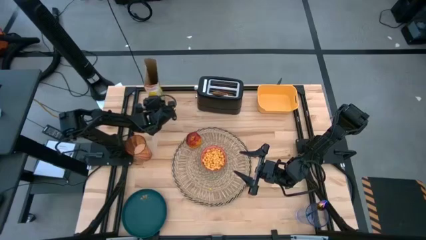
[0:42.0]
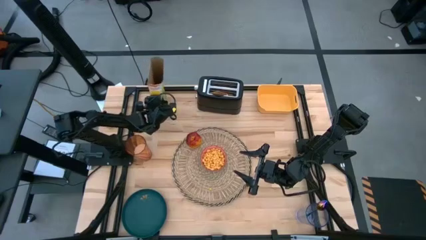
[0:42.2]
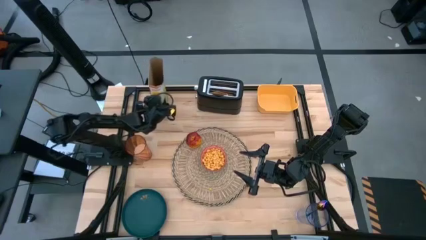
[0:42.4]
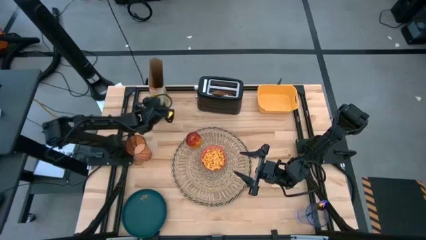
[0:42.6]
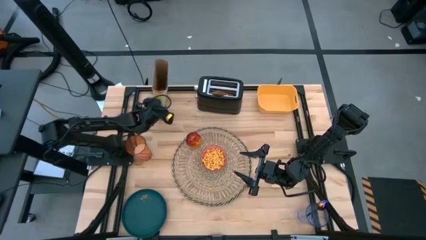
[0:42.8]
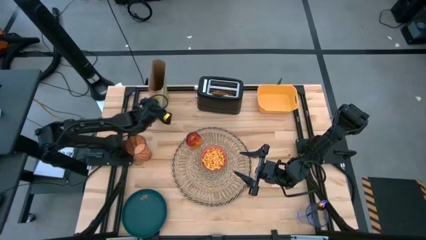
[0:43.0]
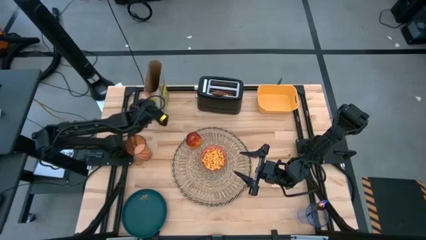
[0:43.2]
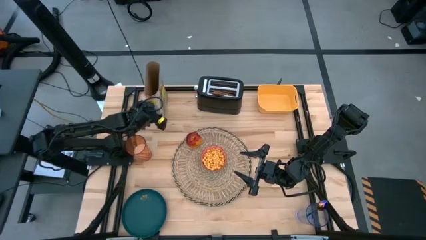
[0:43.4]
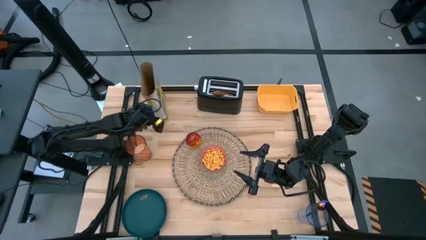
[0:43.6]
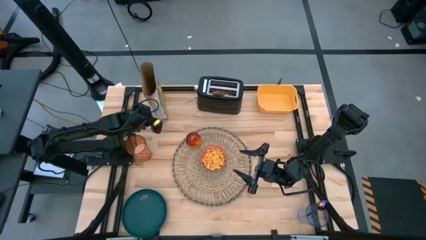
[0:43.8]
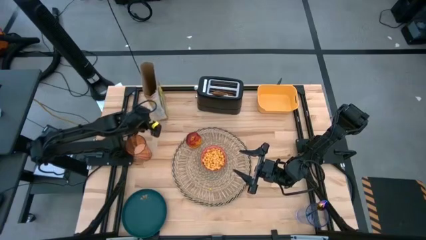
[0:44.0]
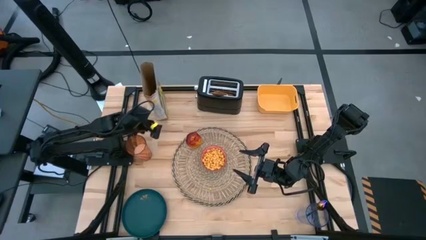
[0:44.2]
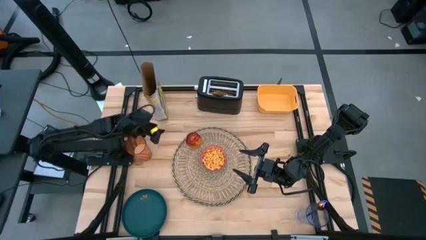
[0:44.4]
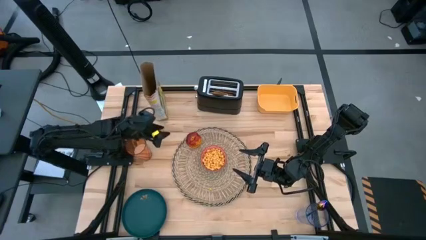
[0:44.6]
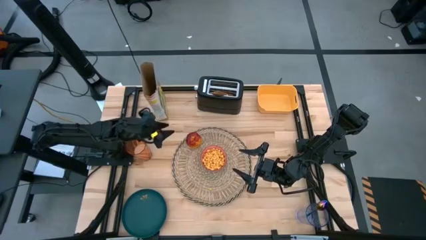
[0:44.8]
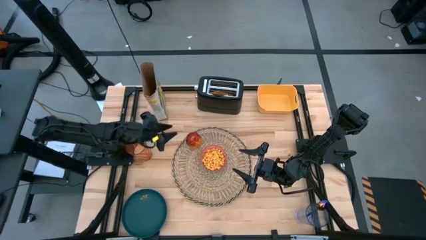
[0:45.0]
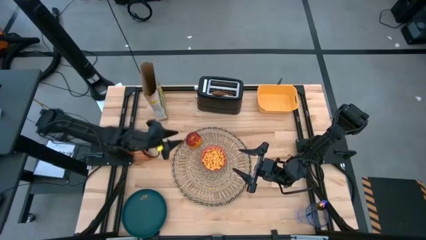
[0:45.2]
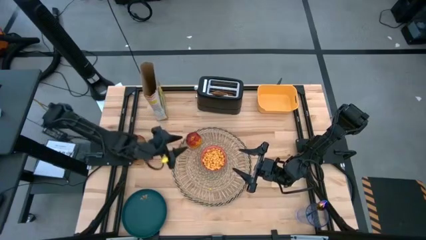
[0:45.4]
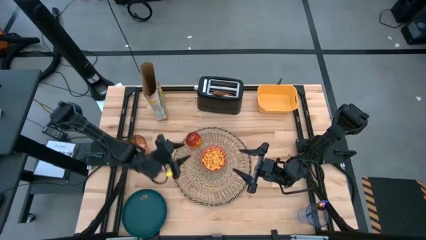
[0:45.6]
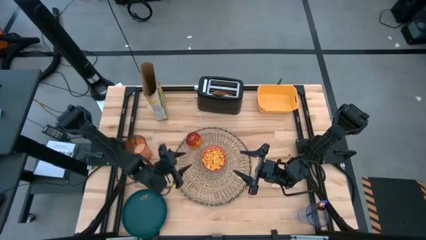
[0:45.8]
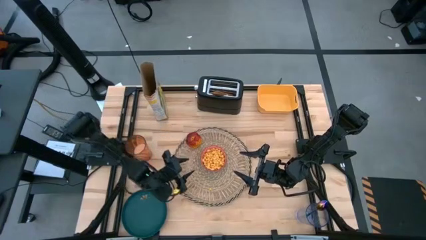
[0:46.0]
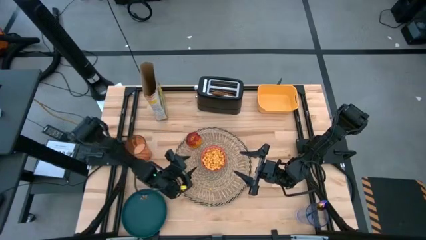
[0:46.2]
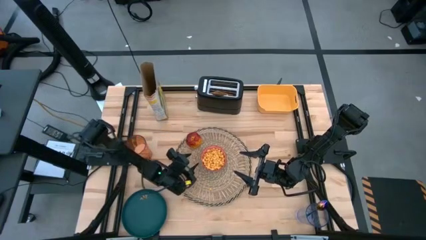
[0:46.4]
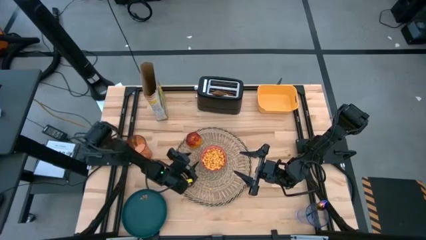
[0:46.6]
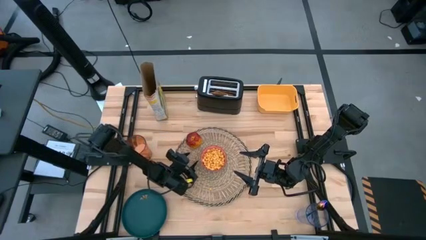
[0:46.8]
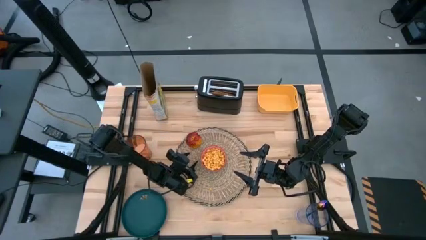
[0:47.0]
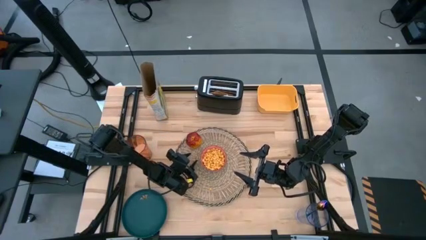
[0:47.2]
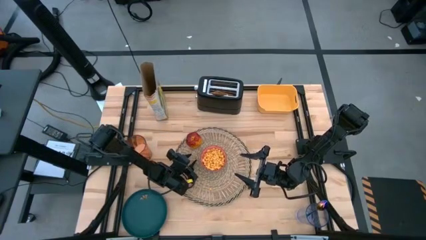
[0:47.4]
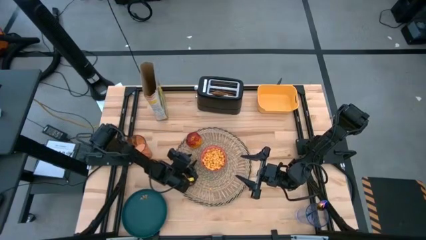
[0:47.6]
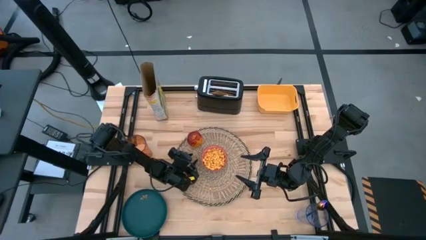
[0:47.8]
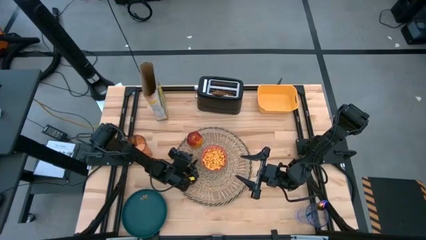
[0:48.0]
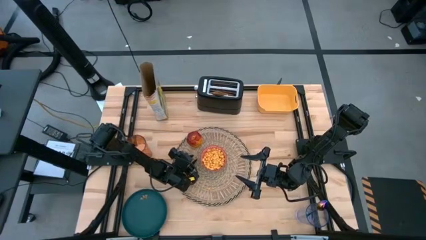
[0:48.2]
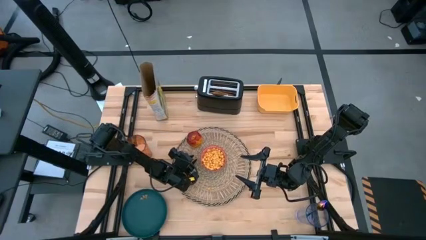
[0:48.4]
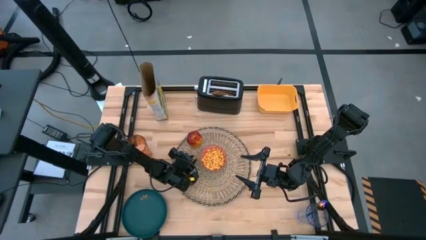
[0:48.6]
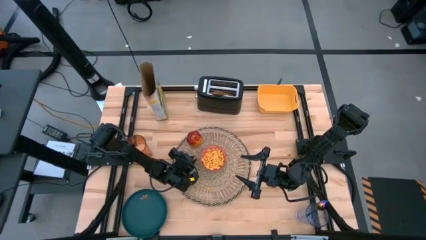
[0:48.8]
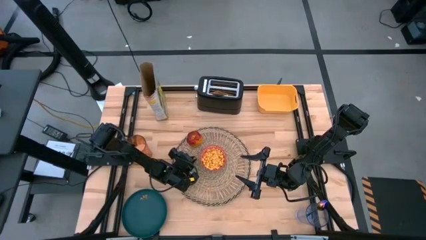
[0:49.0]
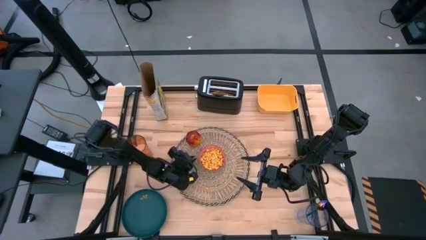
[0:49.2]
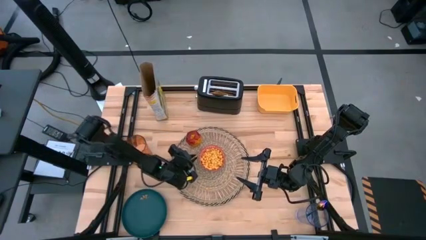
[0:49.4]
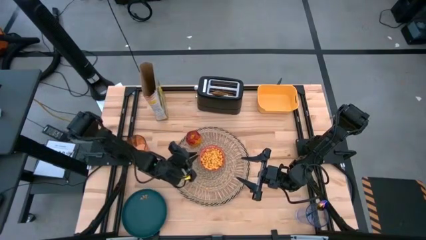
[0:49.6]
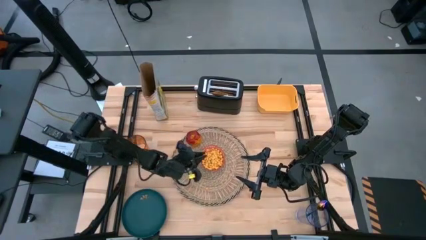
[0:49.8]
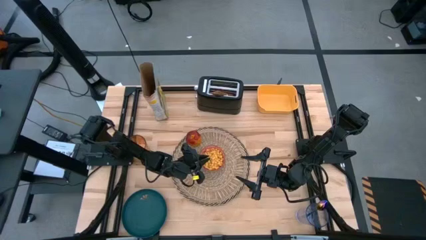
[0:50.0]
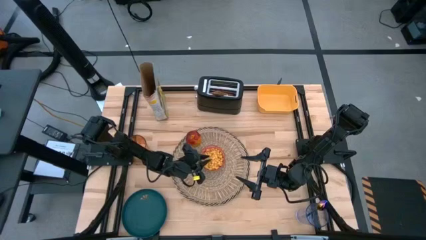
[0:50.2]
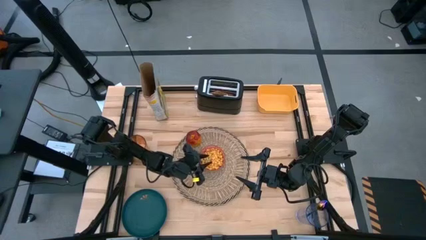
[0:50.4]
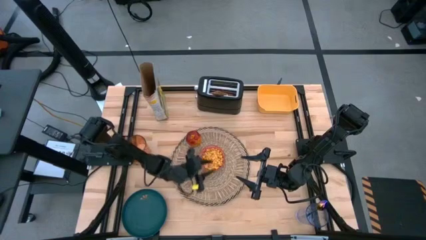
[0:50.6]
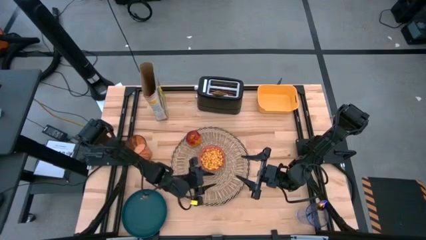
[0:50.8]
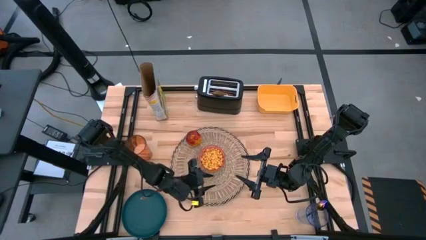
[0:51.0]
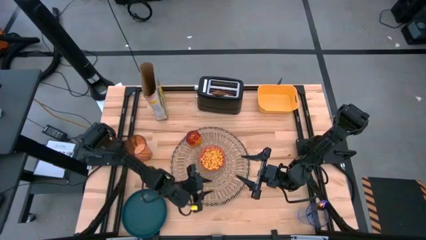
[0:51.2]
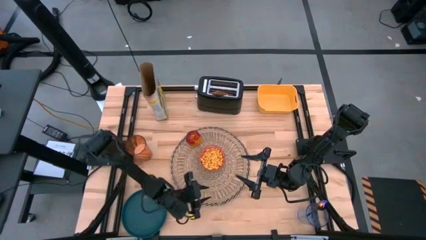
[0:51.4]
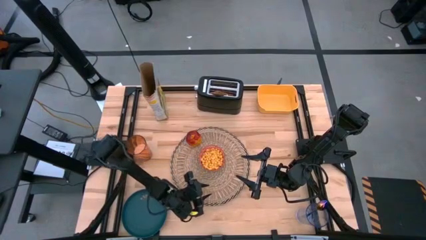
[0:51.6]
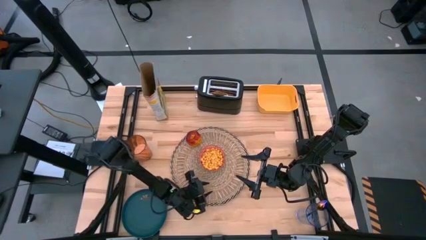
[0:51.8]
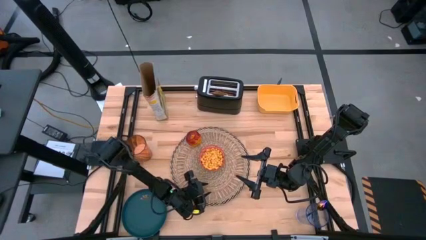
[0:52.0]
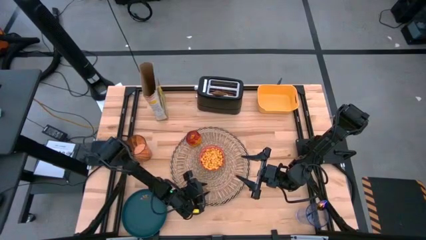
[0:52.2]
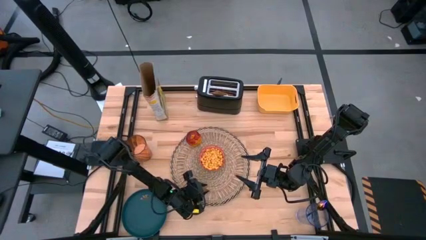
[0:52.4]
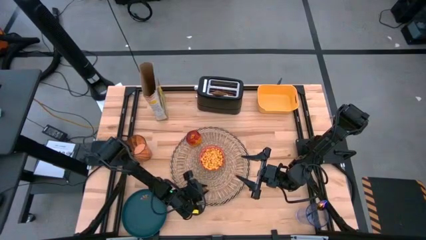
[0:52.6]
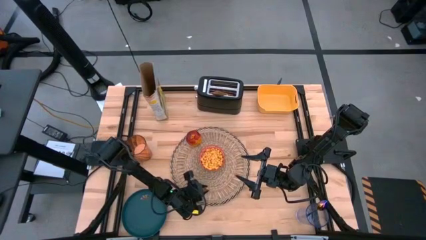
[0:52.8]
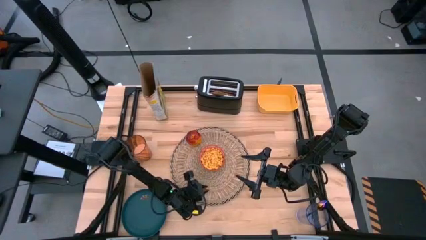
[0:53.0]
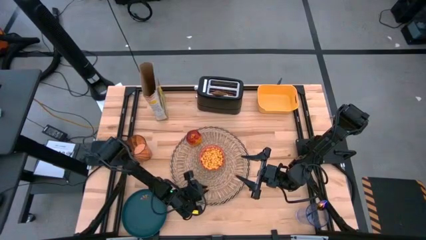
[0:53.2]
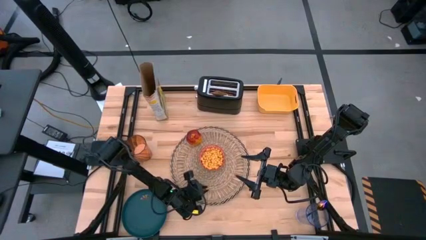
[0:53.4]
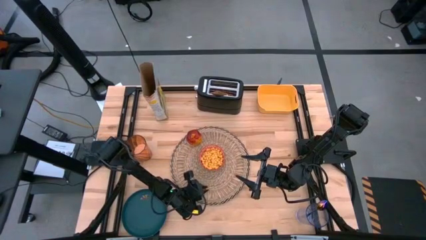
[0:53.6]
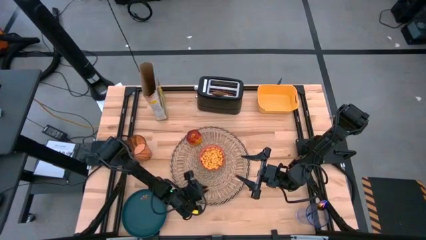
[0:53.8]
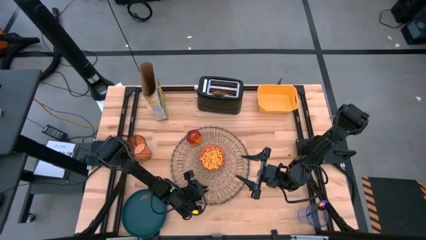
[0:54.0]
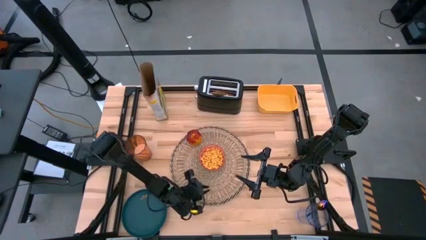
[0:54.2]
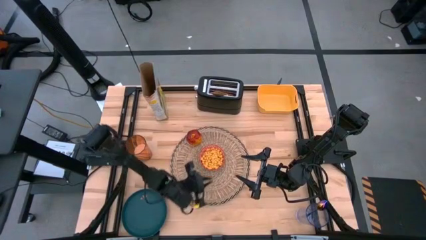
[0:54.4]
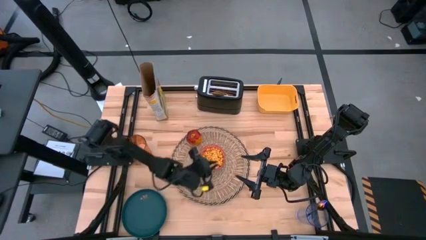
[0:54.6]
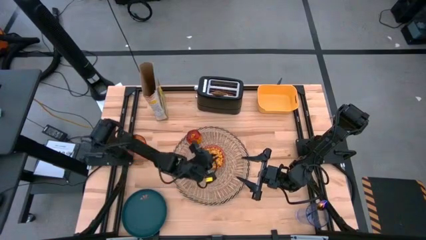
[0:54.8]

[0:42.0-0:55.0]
Task: Arrange a breakfast setting
Pour the cereal into the red patterned bowl

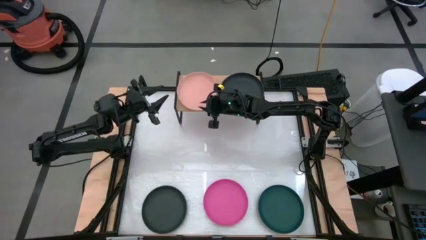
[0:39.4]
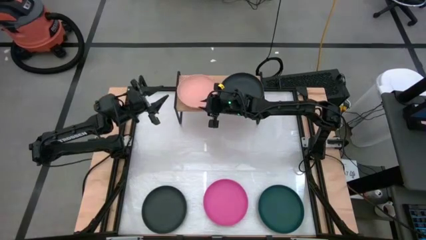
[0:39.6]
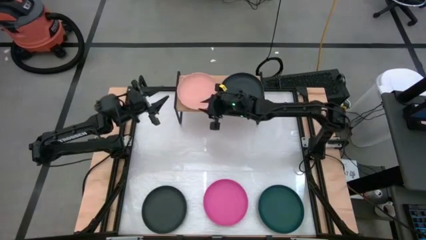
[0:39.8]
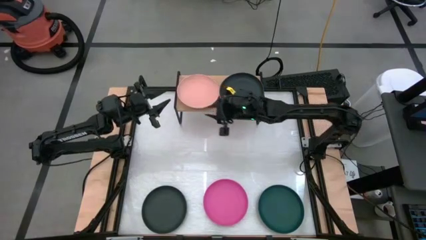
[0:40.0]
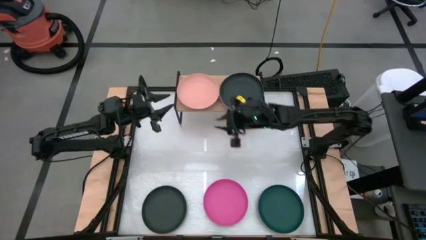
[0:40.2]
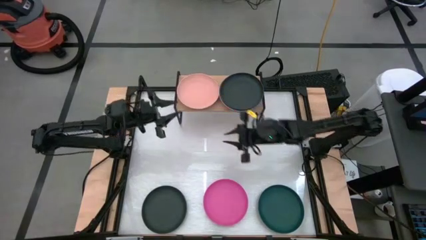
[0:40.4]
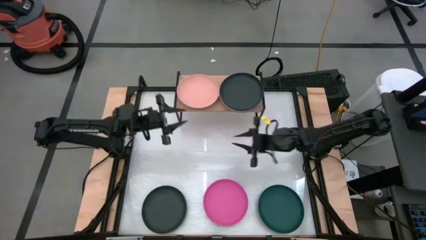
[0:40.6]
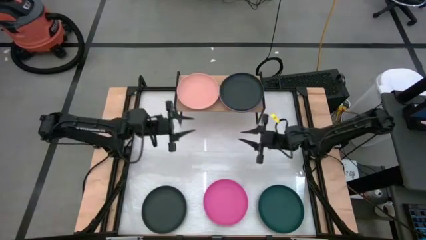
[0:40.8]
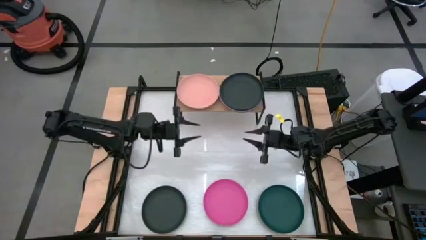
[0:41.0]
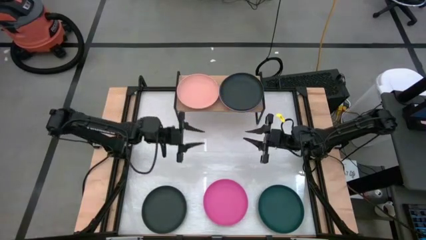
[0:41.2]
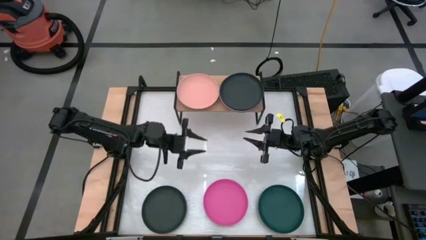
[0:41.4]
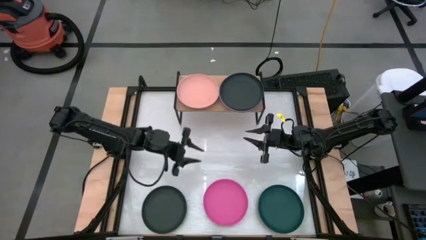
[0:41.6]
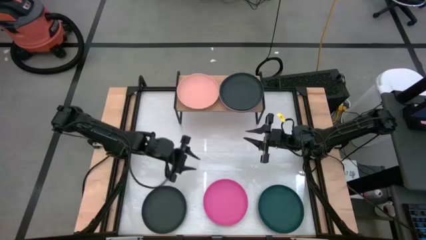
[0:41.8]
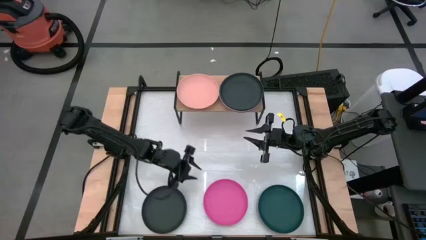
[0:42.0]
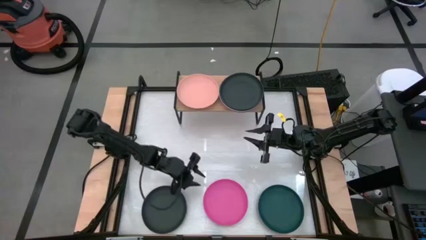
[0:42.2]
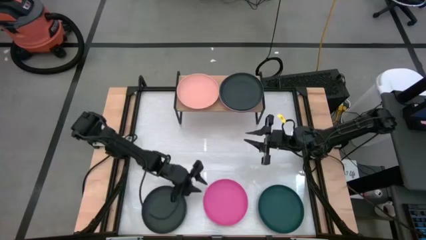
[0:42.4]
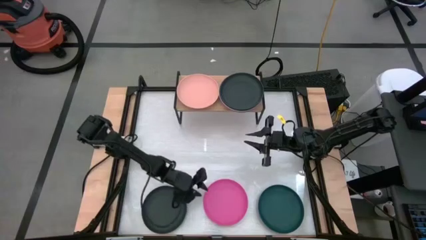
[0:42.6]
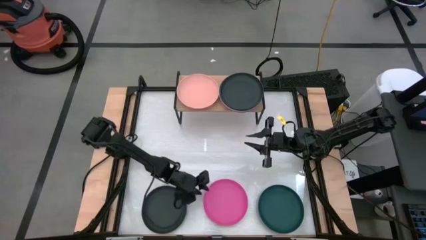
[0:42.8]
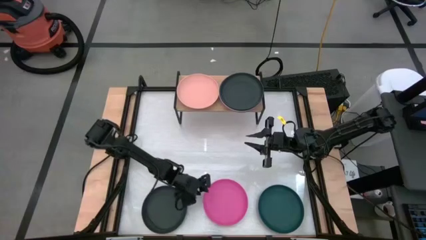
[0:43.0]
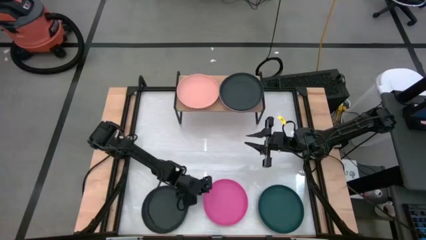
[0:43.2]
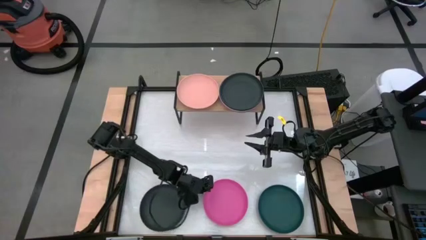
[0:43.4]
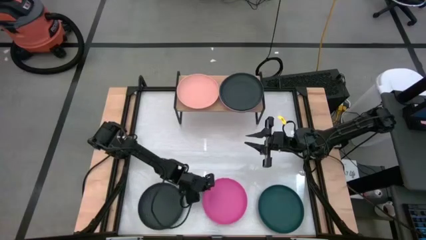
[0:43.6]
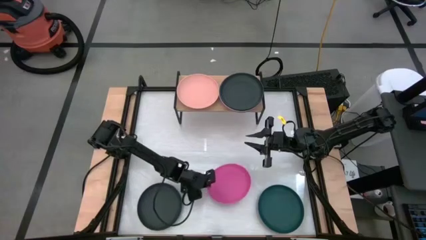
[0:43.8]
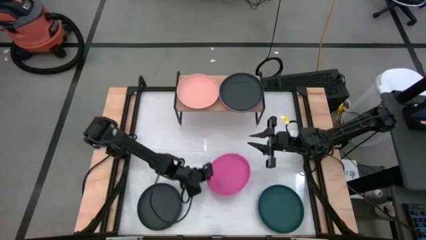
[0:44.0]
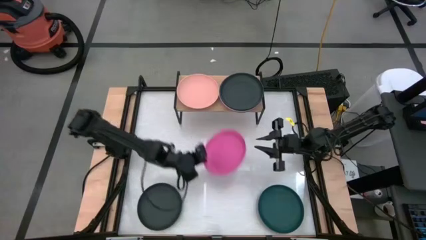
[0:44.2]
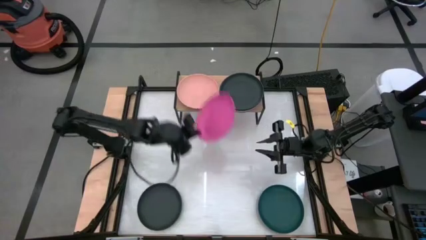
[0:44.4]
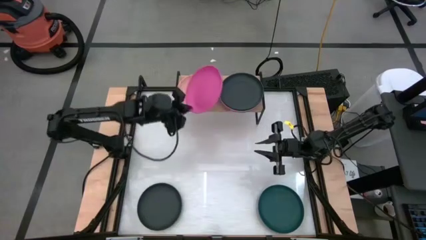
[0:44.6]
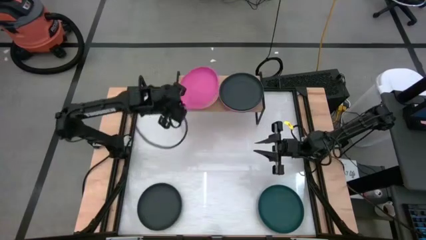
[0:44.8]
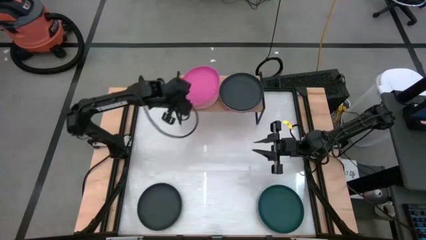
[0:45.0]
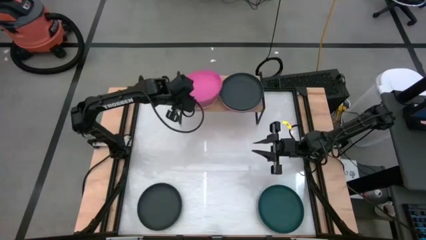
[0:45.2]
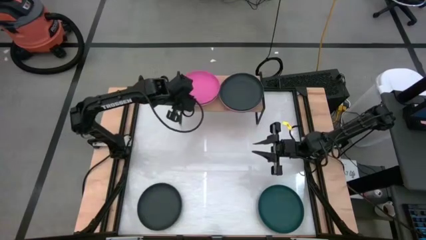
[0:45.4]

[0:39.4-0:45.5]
Task: Place and stack plates onto a shelf
Stack the pink plate on top of the light orange plate on top of the shelf
